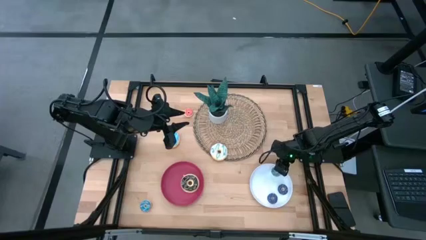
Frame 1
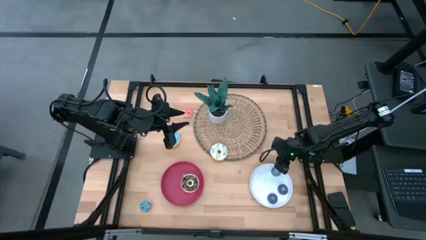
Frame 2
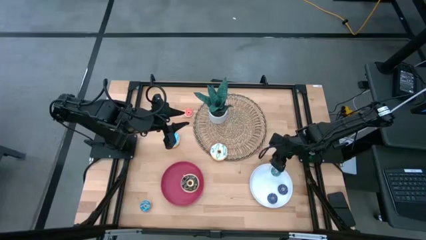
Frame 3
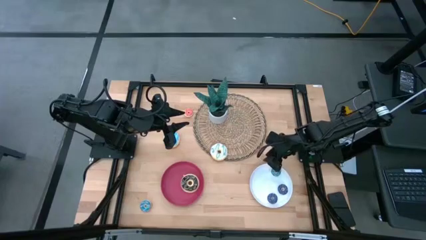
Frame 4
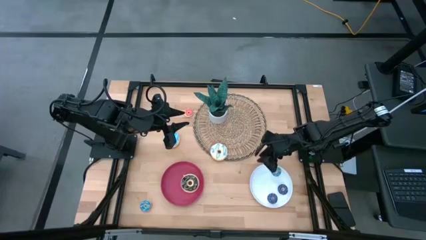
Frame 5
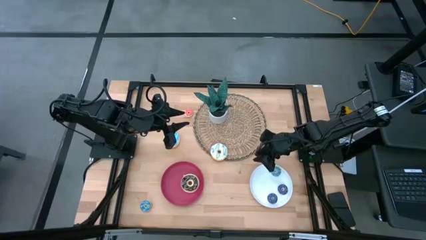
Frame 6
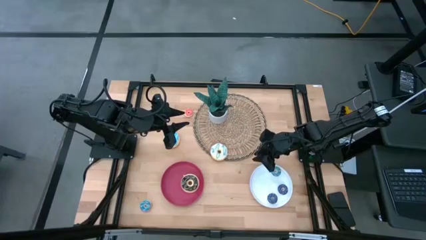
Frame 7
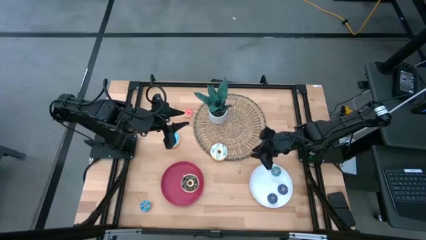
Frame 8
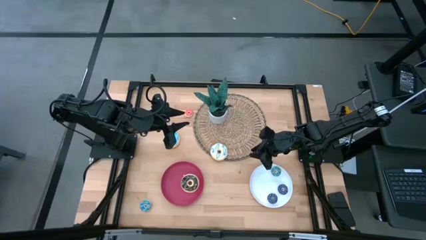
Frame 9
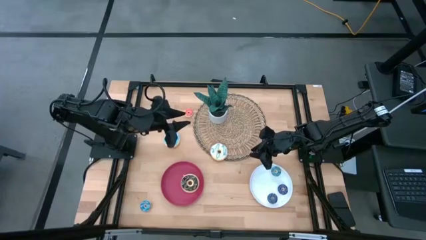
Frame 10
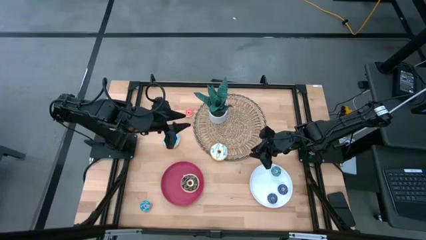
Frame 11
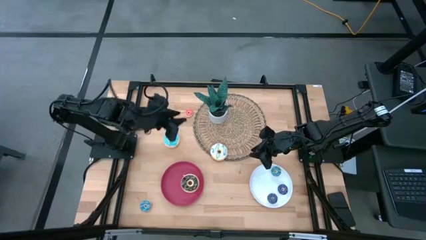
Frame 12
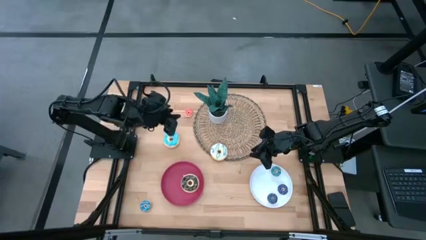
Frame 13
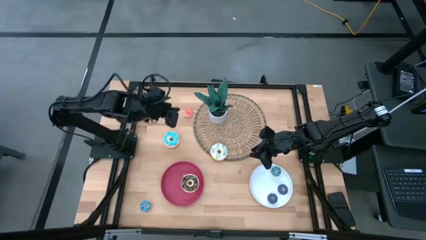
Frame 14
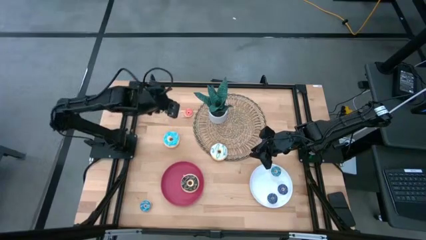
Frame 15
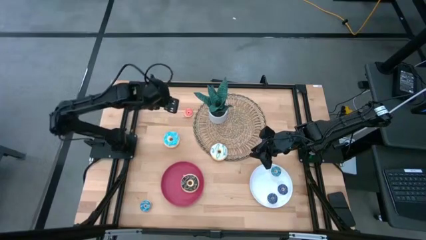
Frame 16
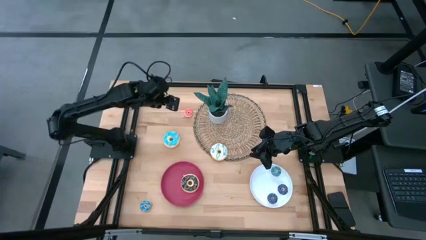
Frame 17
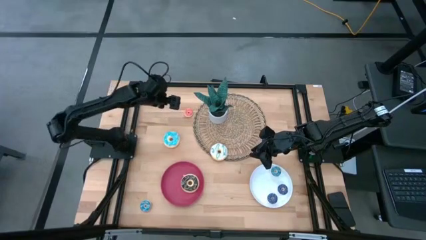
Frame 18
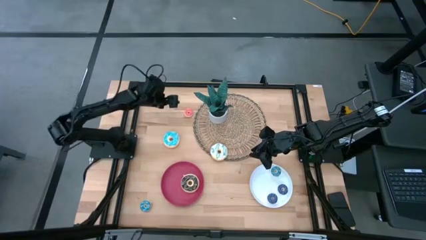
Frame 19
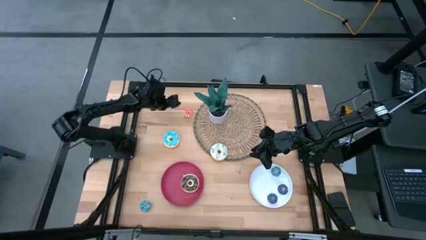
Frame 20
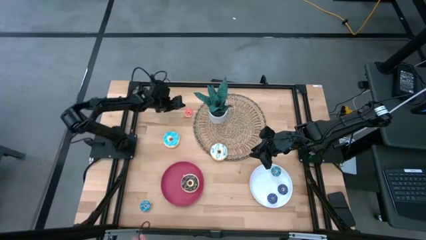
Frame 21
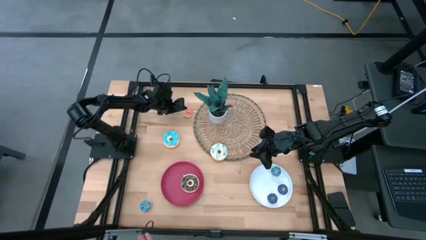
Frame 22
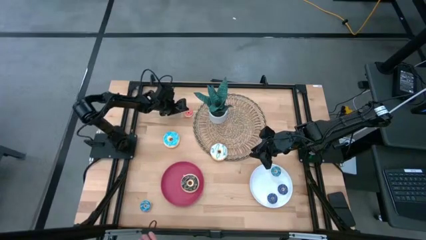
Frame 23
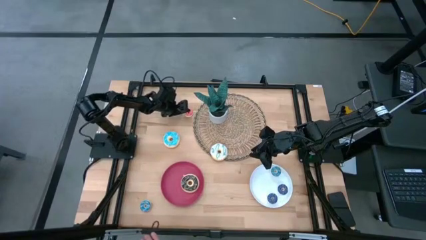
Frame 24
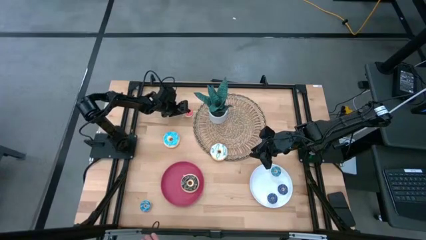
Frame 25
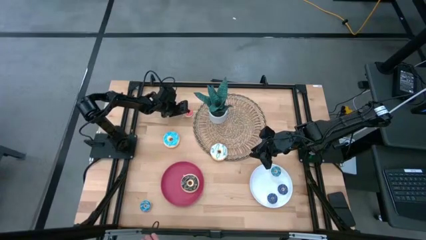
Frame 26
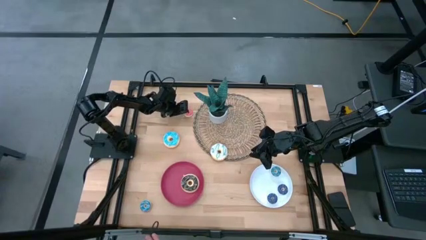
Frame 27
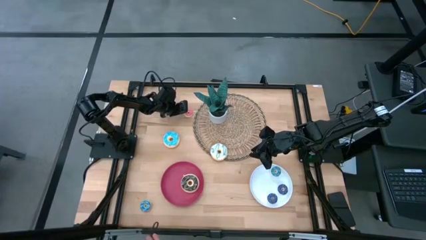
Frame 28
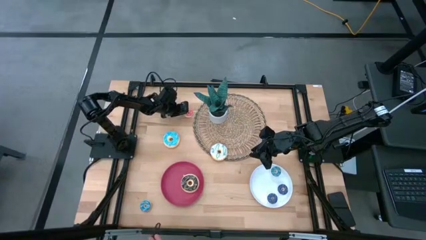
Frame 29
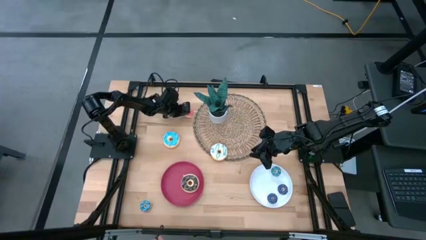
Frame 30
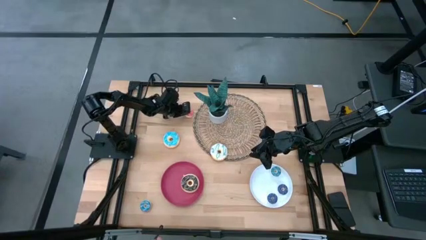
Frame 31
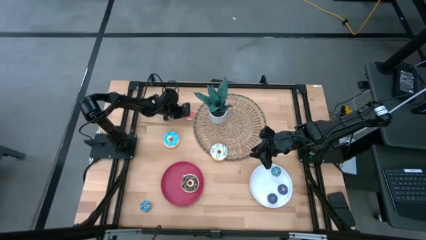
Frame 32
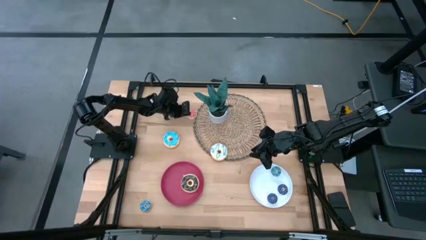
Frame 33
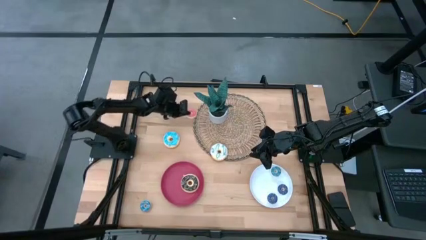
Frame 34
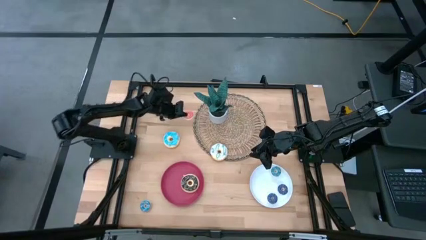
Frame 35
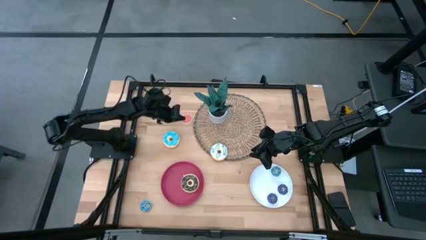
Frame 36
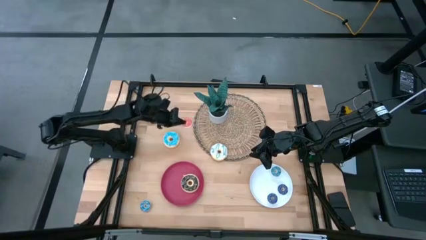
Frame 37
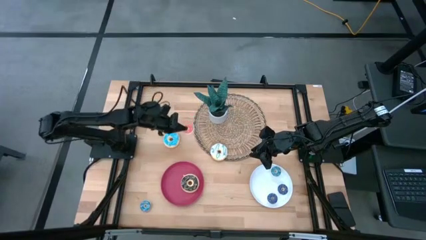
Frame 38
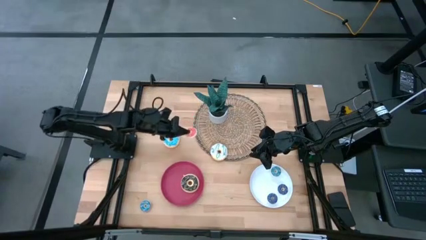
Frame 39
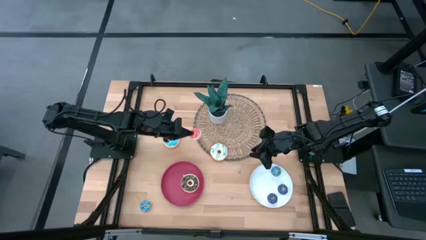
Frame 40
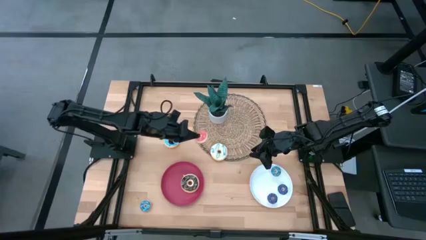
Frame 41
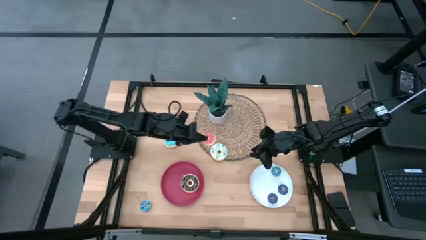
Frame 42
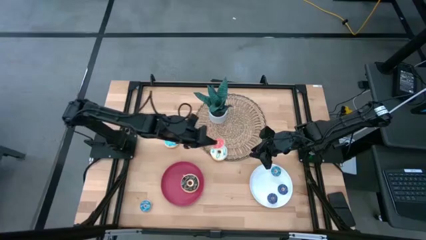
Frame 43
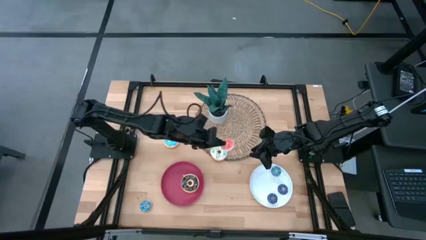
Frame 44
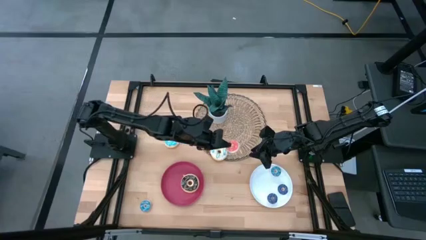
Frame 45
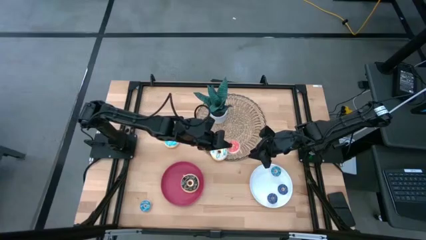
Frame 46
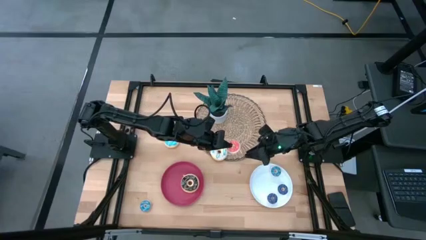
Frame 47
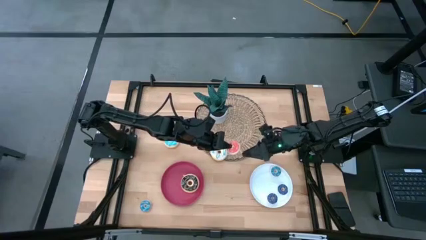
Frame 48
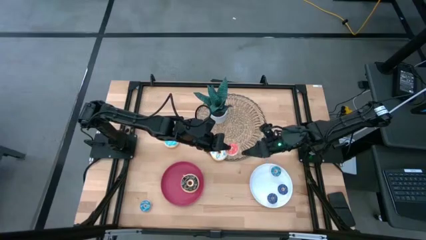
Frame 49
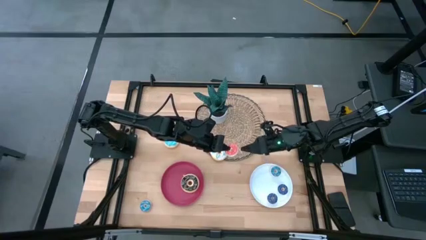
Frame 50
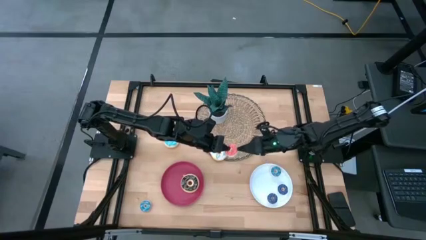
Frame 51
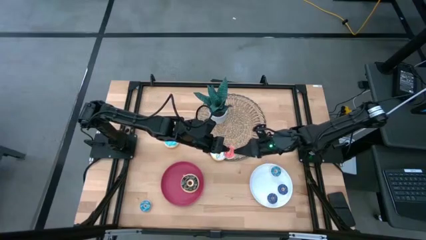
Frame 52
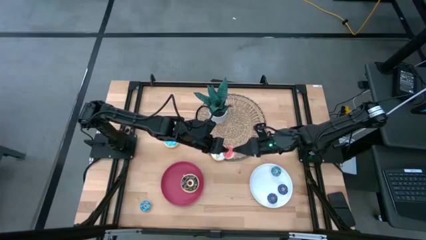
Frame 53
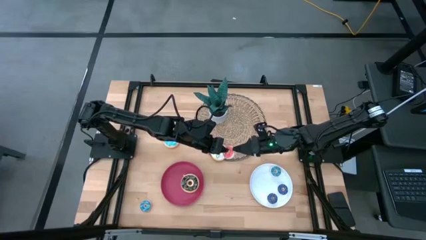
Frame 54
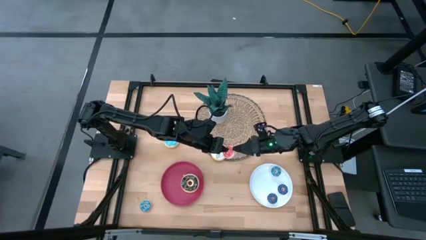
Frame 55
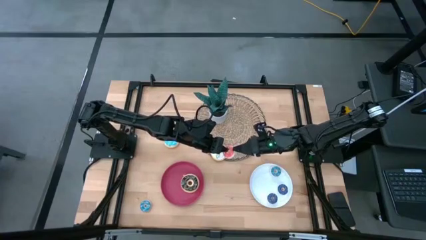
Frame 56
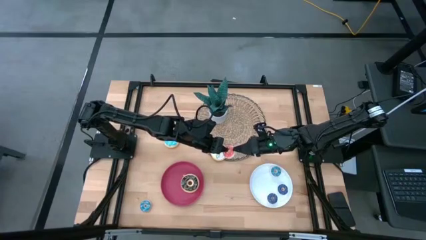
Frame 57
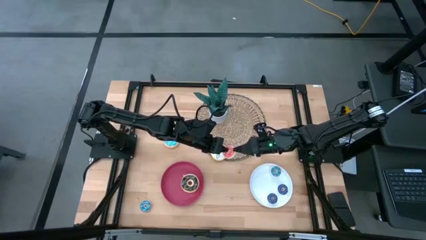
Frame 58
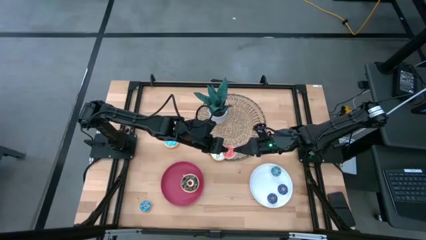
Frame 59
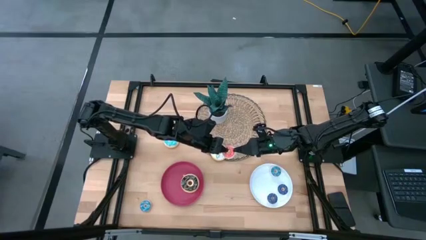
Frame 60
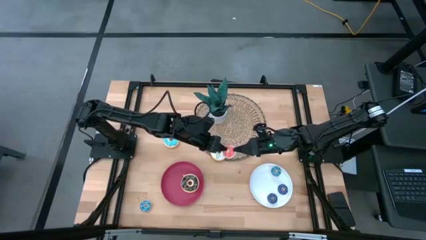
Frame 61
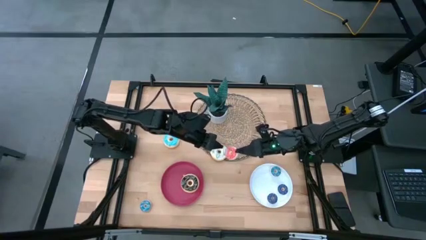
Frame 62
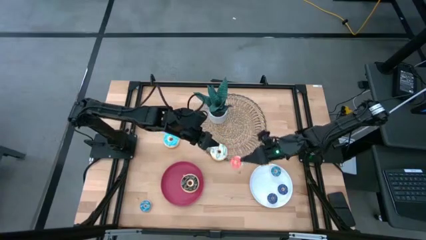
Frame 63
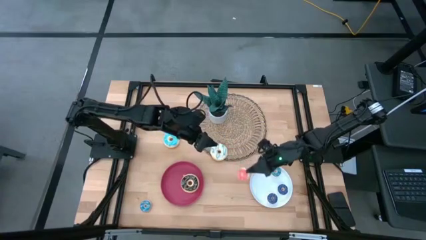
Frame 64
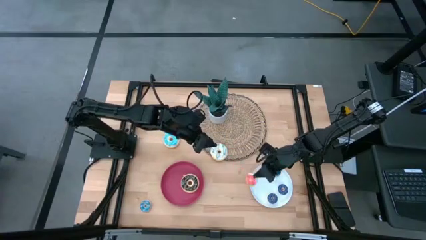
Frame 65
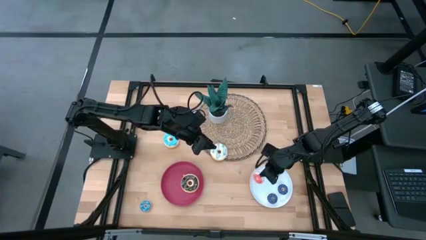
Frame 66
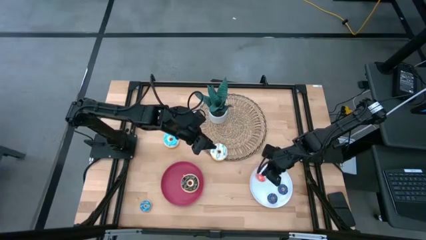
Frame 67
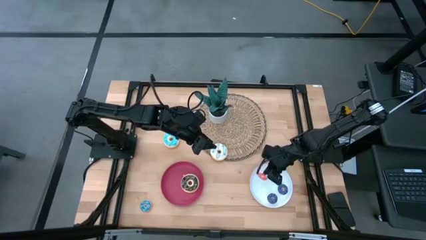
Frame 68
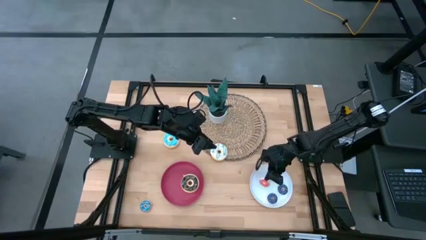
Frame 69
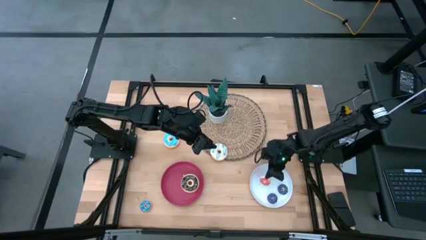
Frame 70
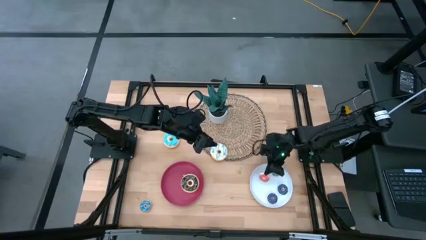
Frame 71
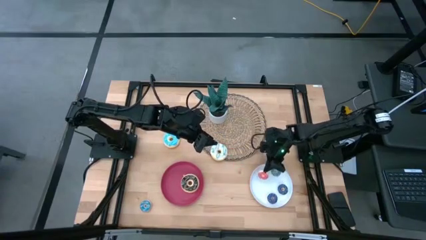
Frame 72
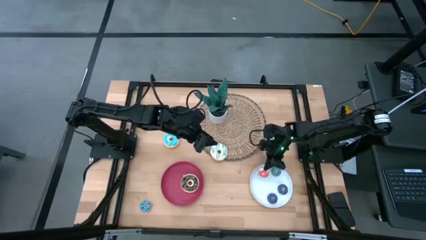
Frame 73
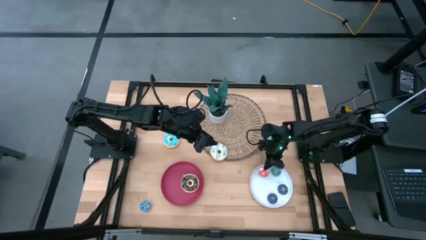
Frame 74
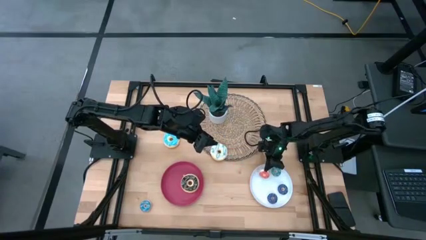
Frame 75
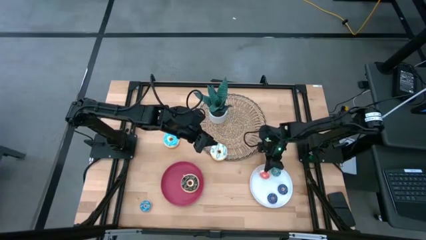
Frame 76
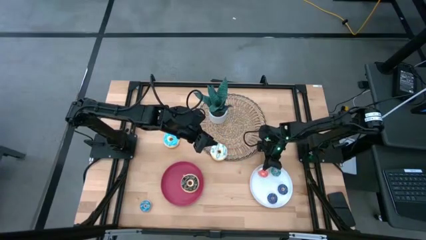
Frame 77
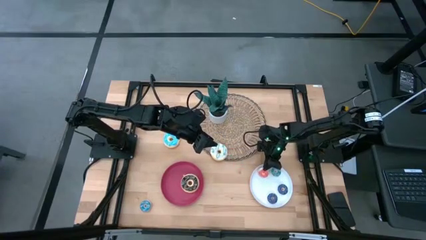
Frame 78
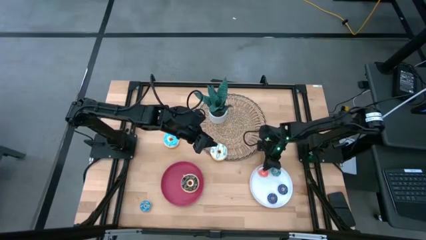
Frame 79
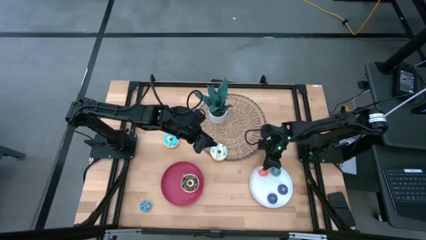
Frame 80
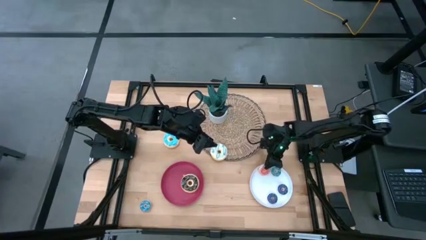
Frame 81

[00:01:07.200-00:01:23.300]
Task: Pick & Place donuts
Put the pink donut on the white plate
